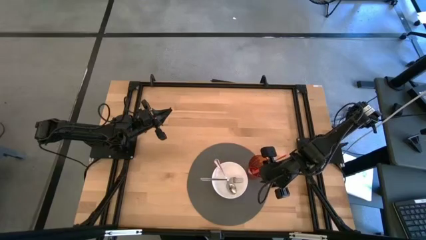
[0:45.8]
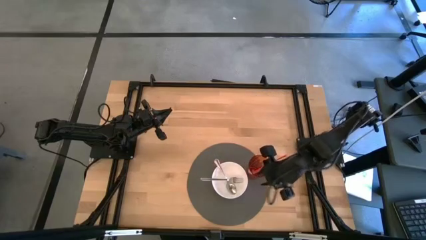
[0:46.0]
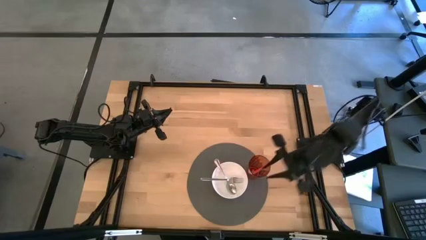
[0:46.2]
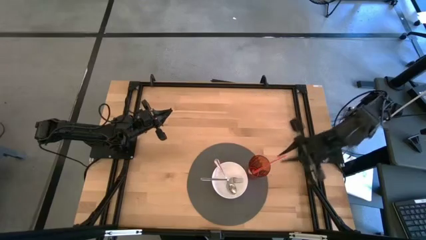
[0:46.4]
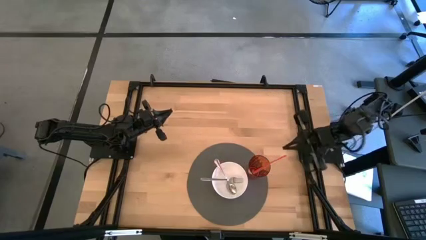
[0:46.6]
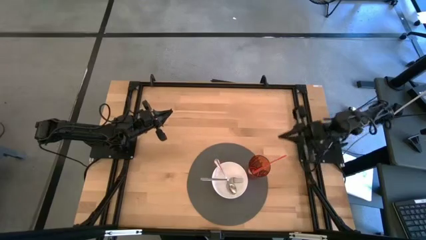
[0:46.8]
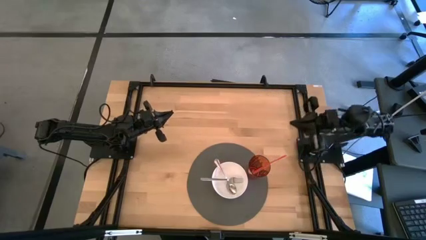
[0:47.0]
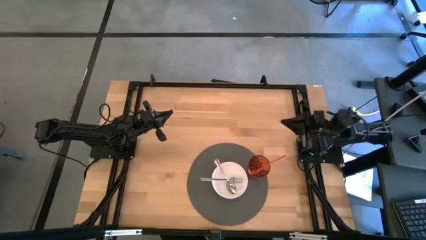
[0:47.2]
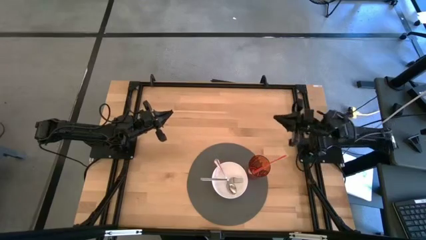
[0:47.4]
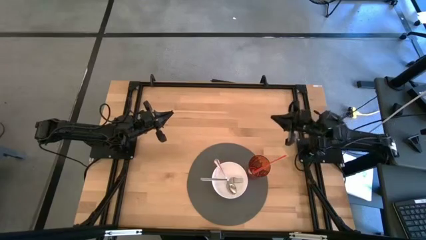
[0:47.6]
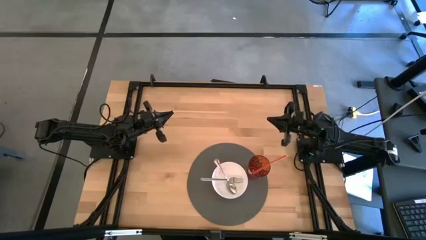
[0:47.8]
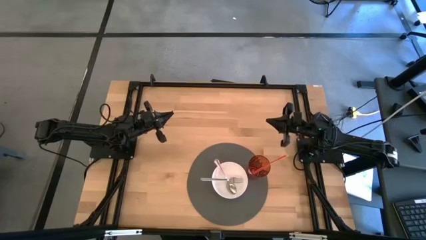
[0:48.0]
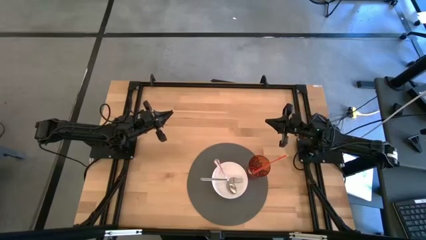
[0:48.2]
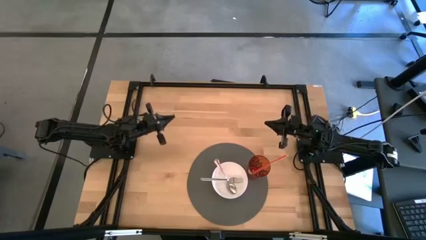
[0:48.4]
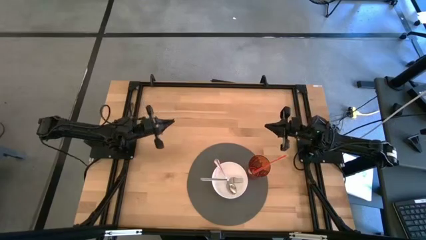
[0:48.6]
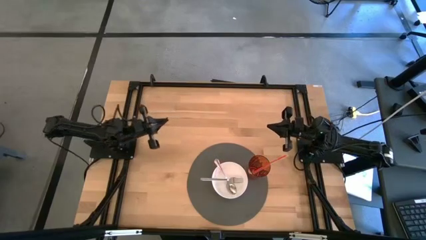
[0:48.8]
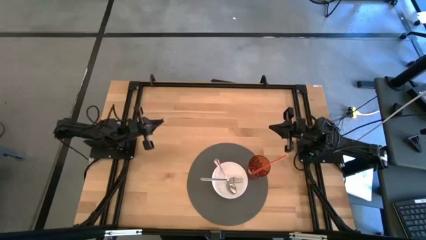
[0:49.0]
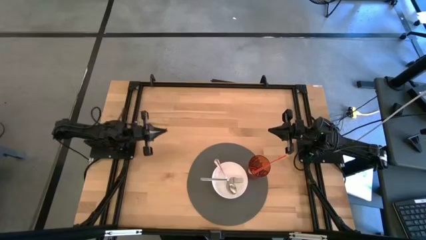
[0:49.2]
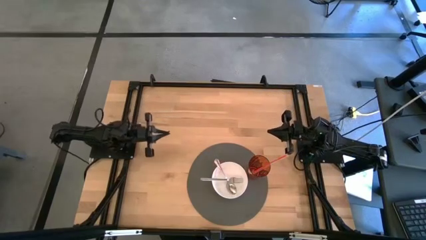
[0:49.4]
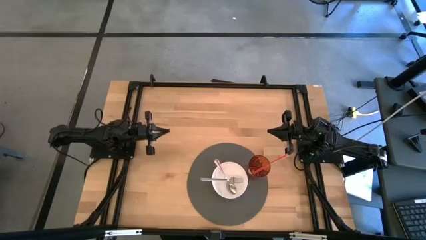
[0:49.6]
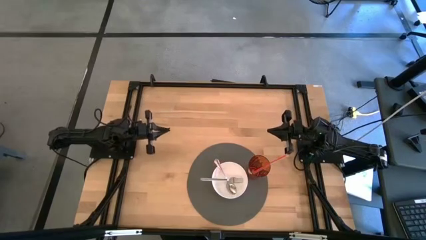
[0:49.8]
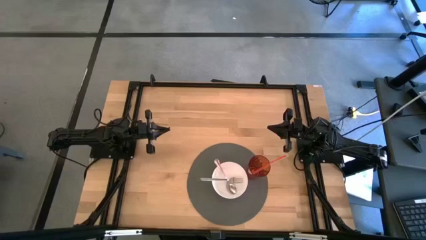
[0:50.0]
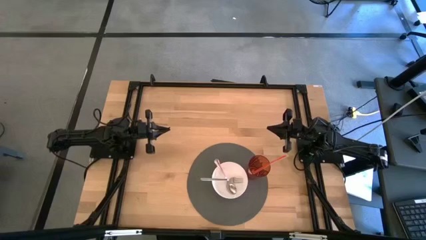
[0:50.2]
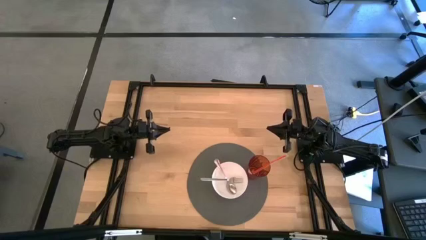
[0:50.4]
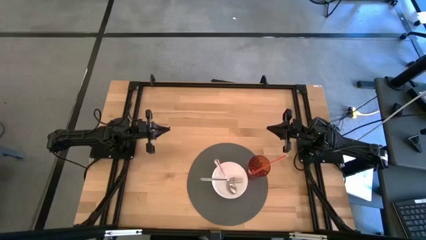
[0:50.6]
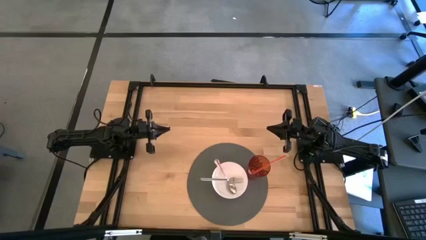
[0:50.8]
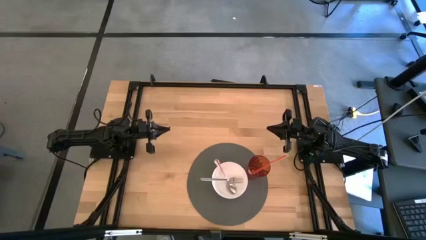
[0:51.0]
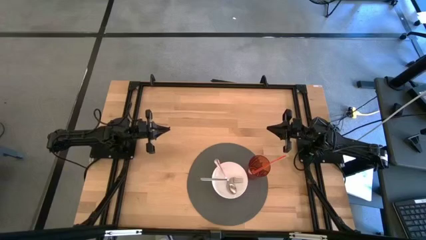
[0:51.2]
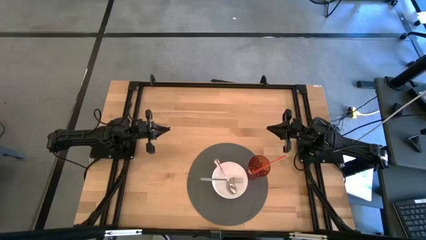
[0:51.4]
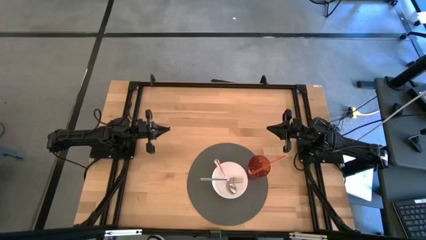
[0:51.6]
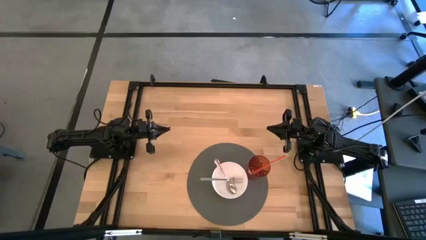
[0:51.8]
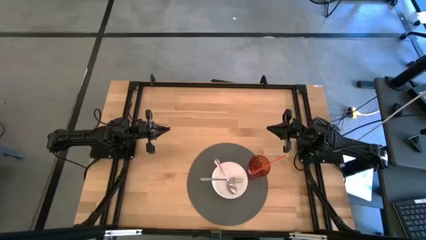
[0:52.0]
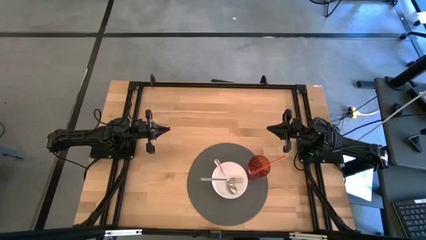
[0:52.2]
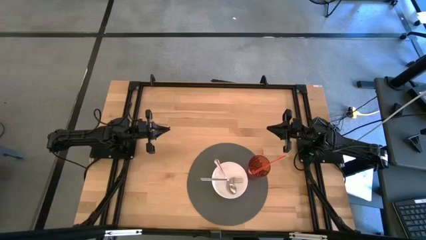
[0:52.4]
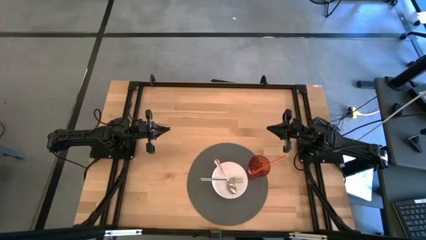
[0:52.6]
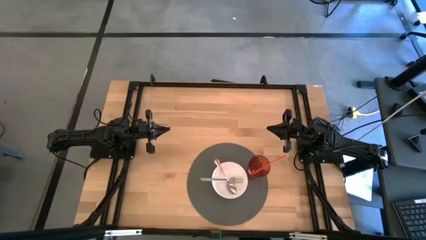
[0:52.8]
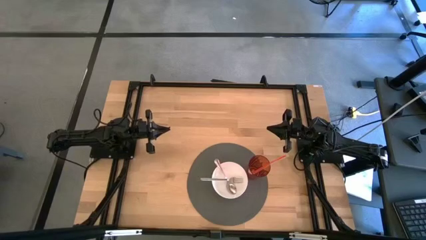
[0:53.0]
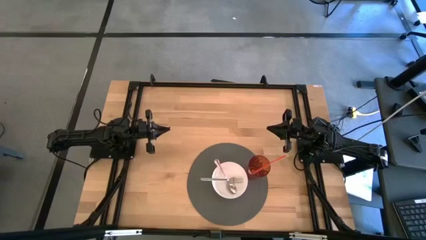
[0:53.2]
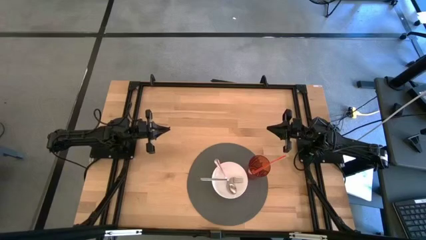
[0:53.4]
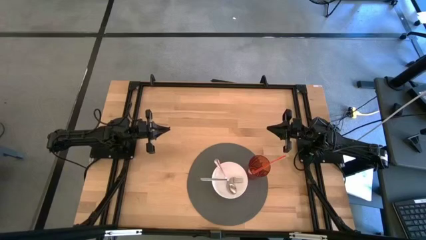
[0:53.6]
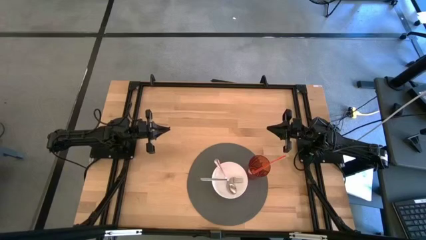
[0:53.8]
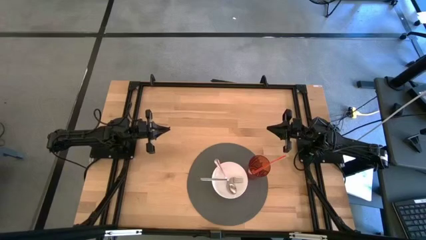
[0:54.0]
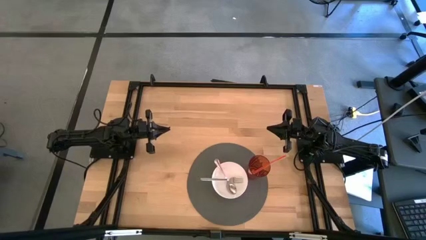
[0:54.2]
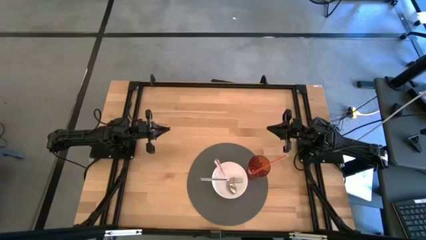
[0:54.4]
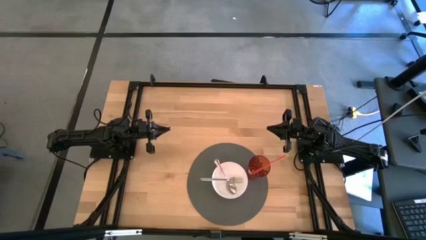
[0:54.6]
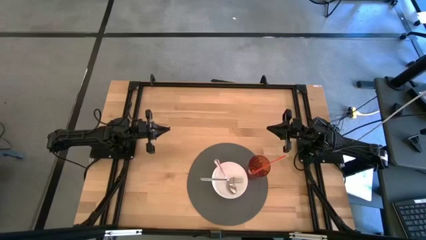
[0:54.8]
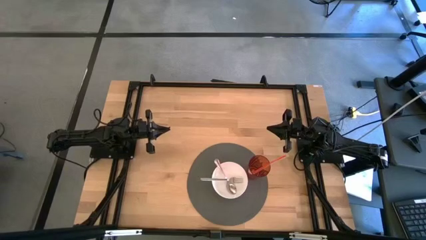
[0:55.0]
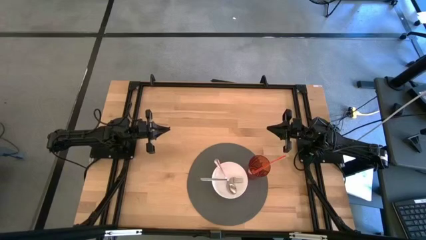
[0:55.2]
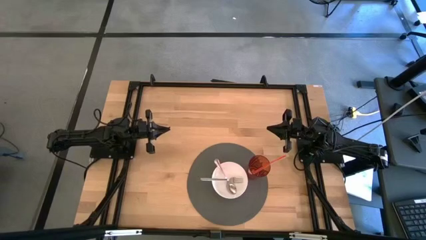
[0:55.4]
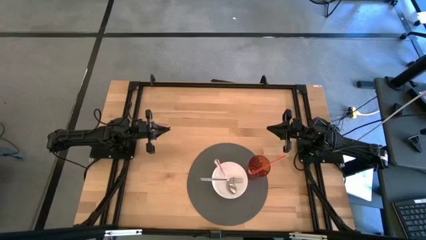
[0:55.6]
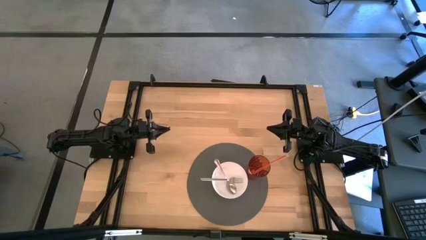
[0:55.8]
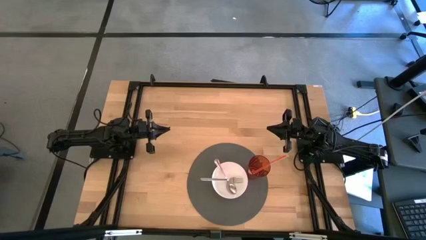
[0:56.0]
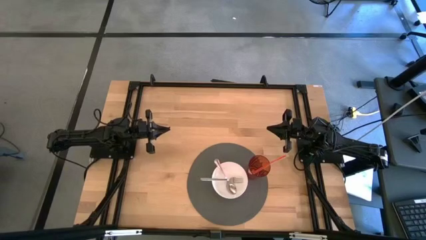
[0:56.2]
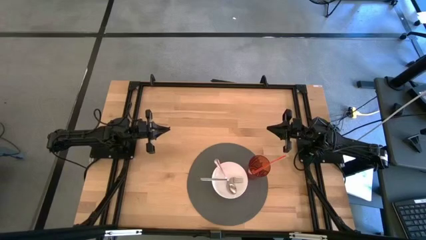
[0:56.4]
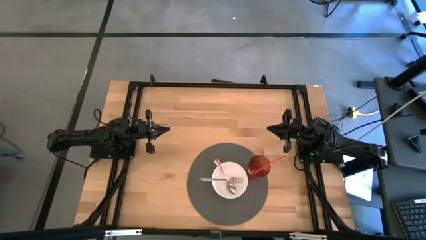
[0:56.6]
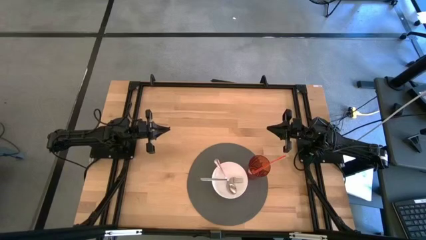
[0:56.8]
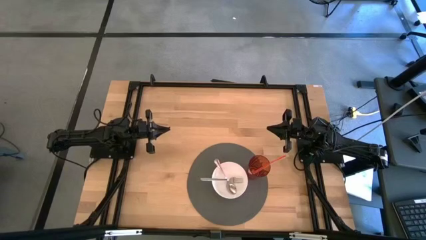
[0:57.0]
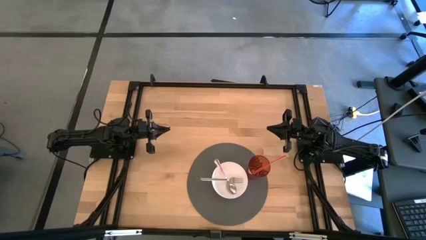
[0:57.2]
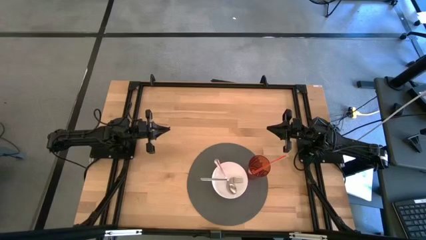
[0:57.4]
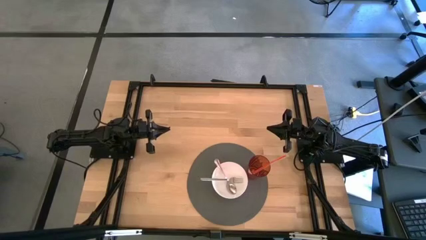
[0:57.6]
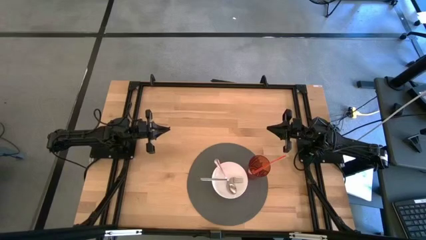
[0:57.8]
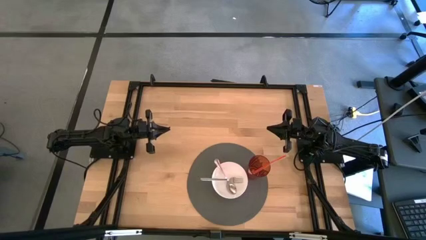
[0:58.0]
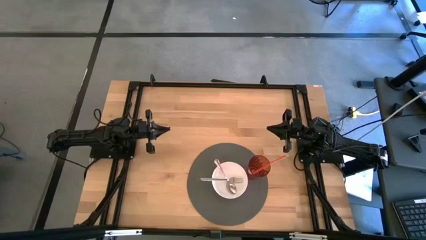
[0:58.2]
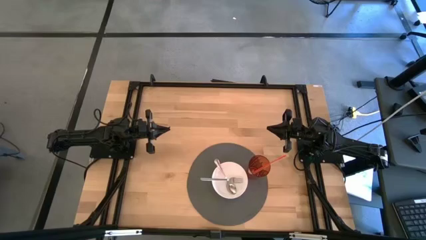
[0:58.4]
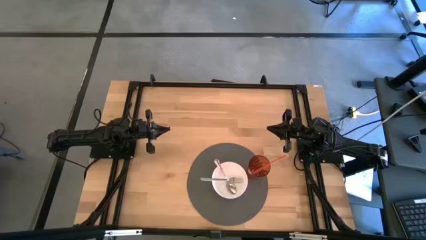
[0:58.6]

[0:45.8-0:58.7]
Task: Pick & Place Utensil
Return to Home Position
